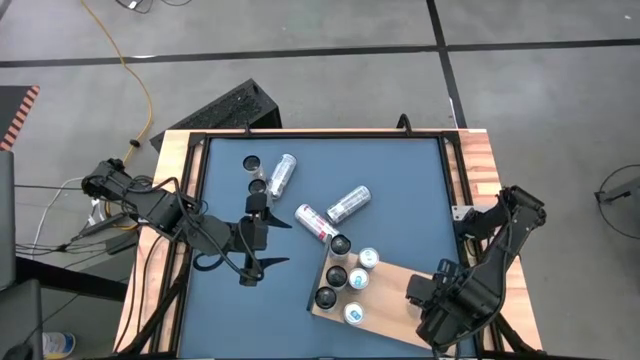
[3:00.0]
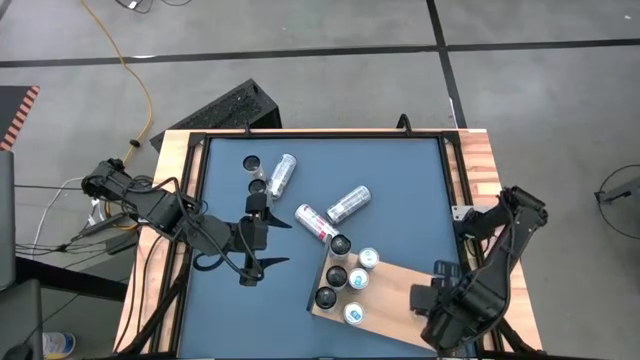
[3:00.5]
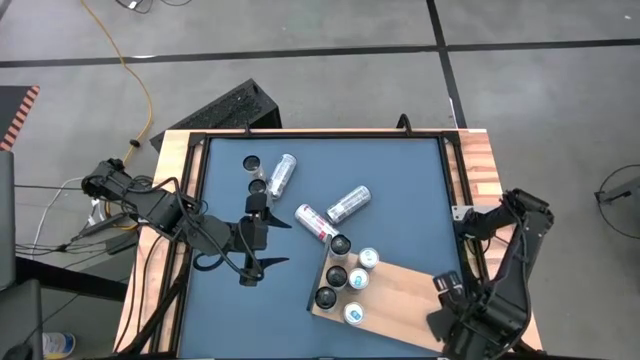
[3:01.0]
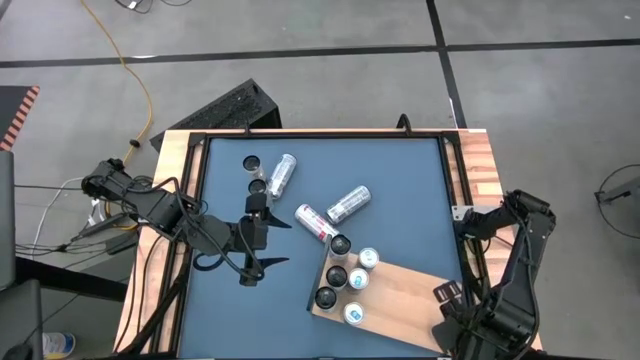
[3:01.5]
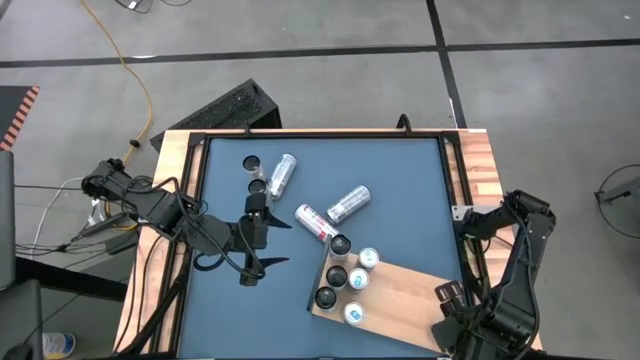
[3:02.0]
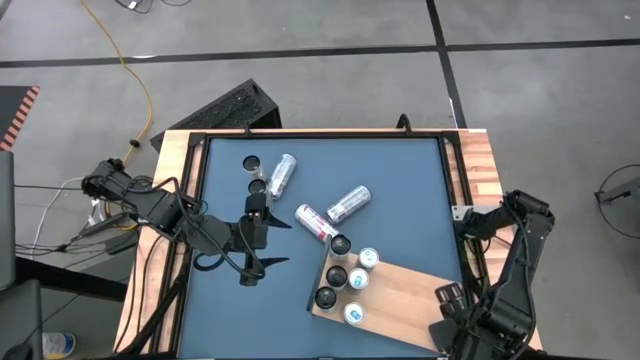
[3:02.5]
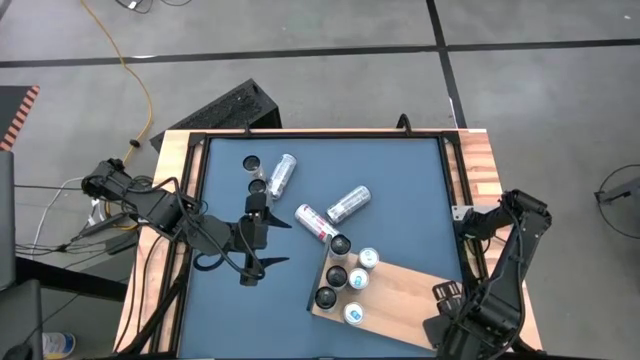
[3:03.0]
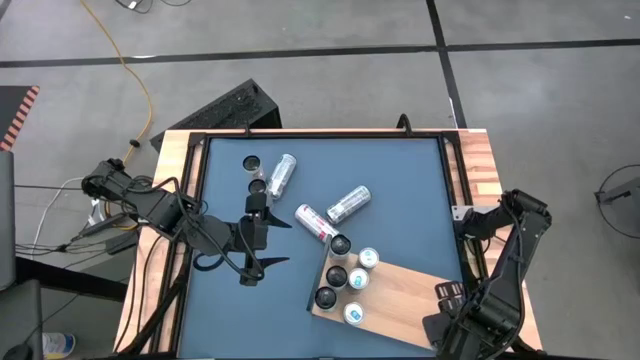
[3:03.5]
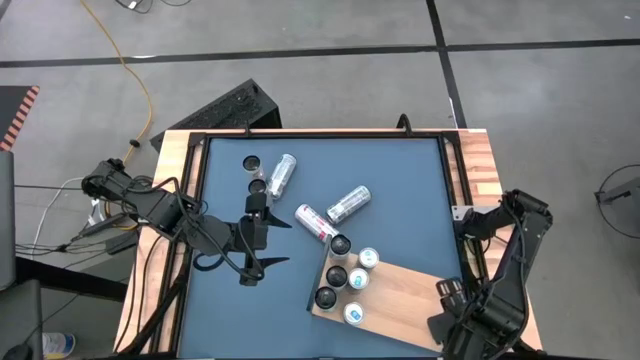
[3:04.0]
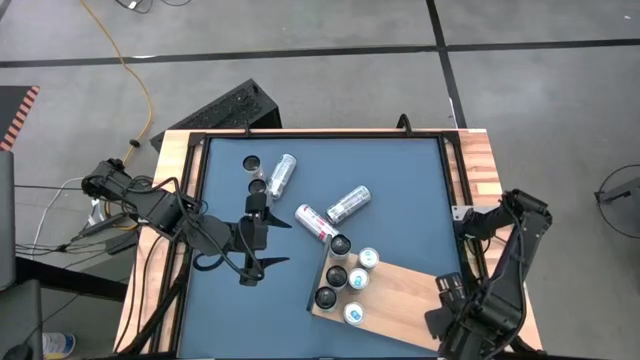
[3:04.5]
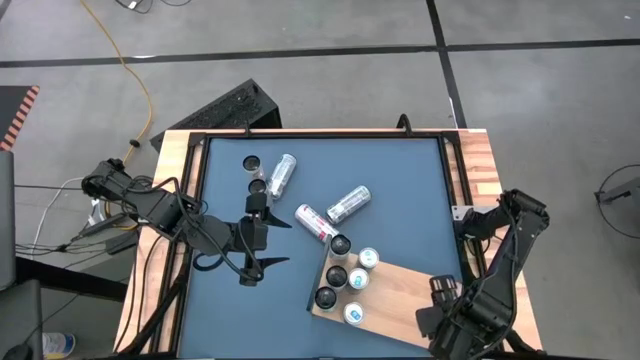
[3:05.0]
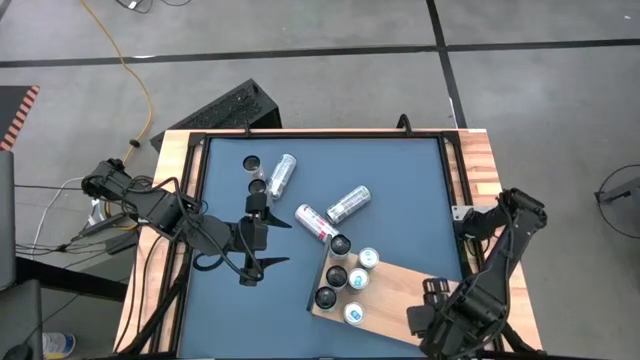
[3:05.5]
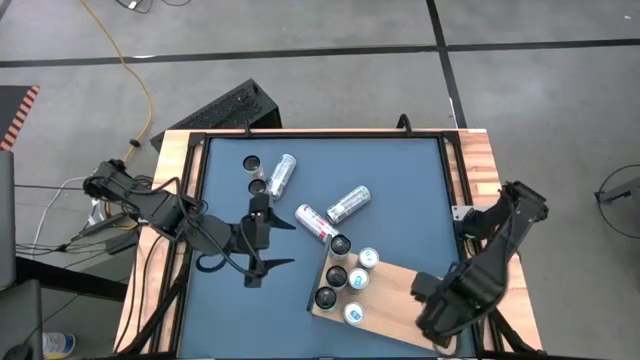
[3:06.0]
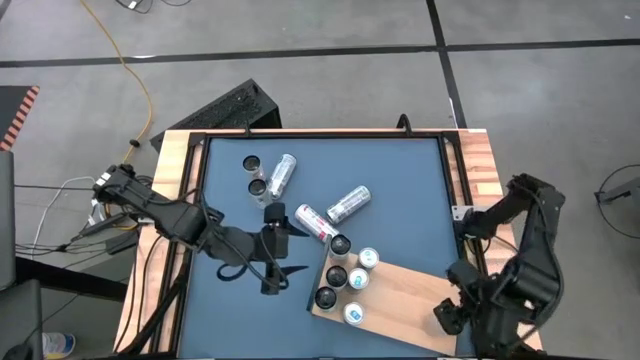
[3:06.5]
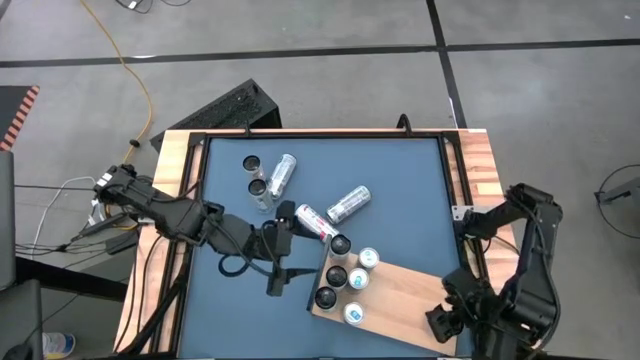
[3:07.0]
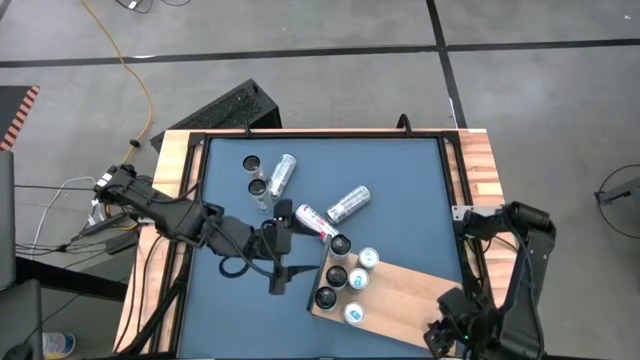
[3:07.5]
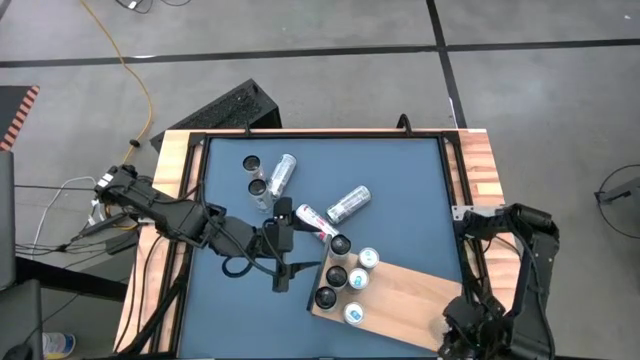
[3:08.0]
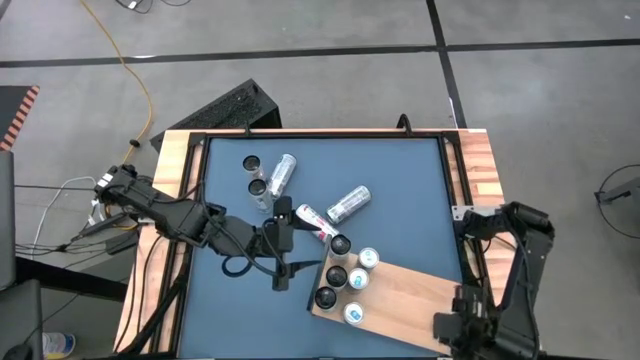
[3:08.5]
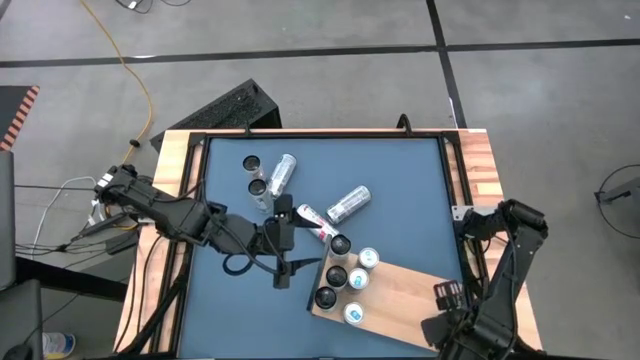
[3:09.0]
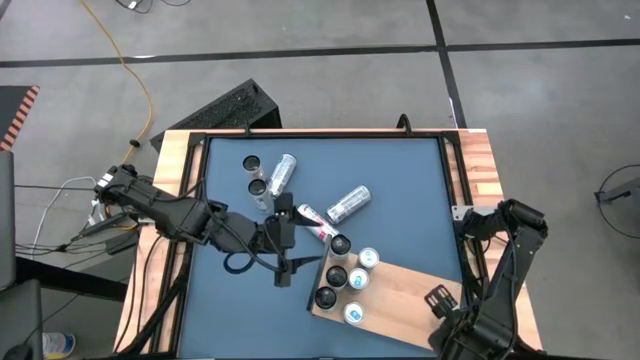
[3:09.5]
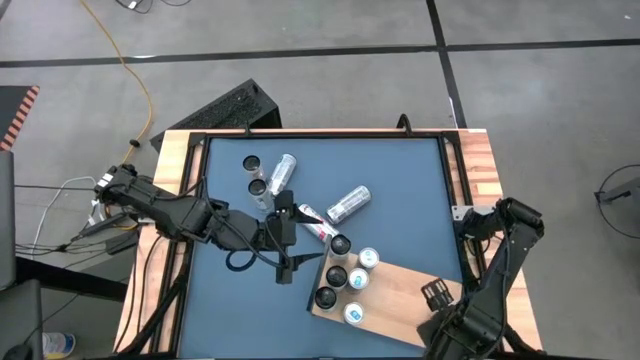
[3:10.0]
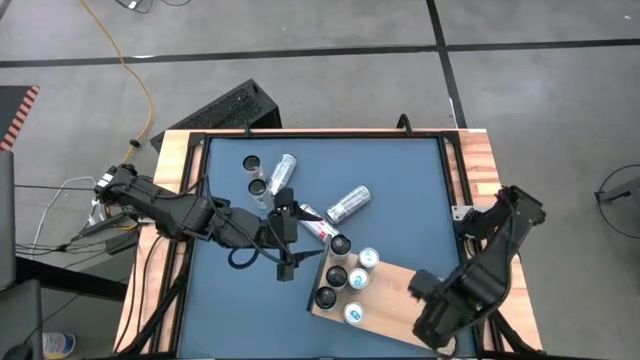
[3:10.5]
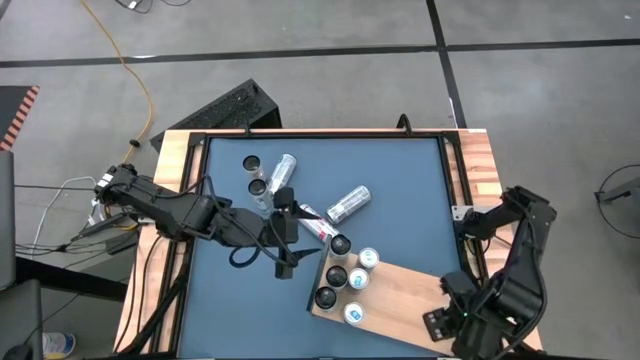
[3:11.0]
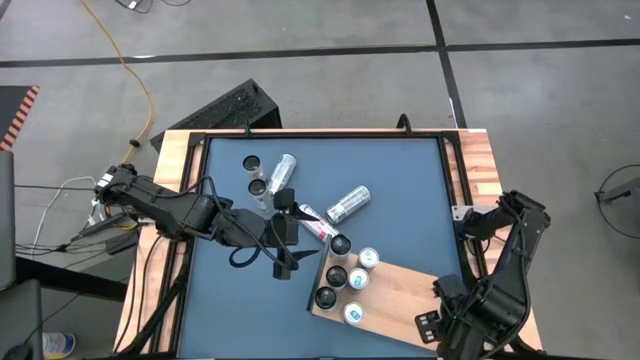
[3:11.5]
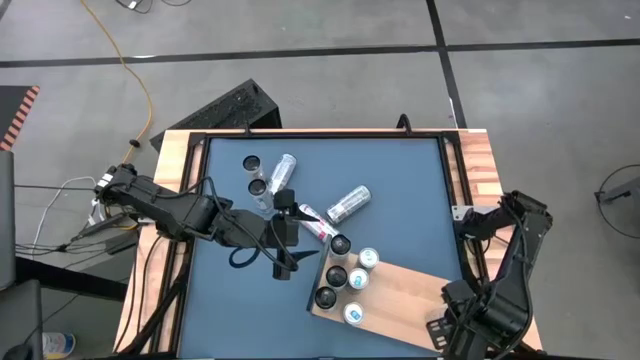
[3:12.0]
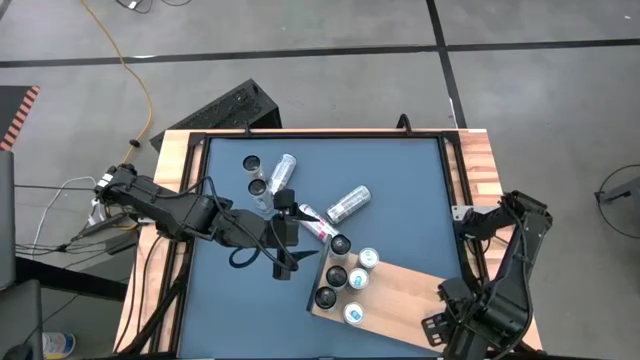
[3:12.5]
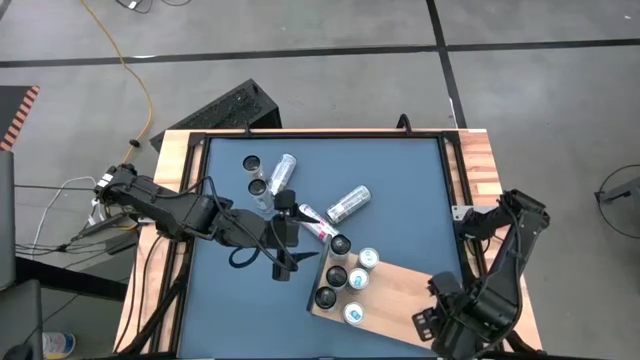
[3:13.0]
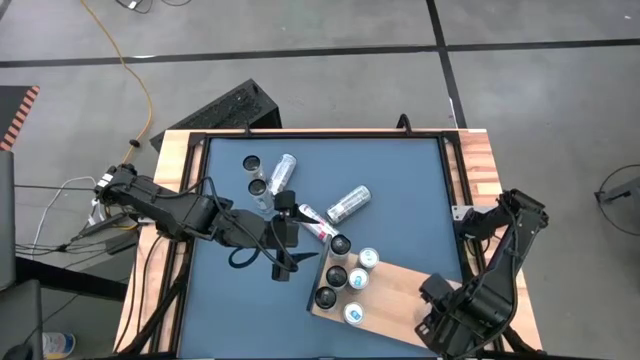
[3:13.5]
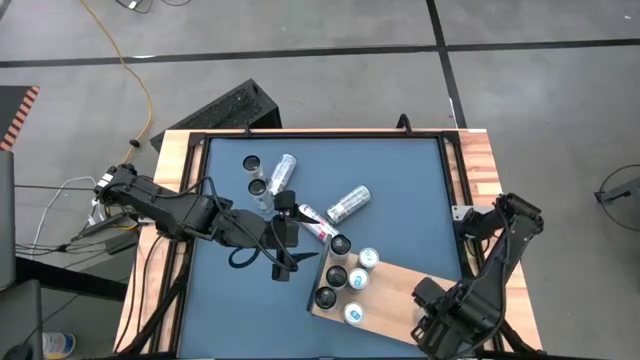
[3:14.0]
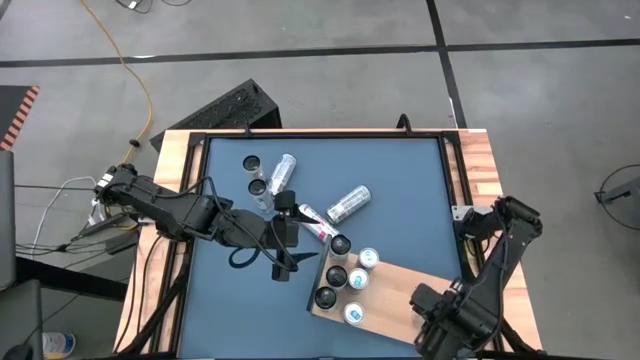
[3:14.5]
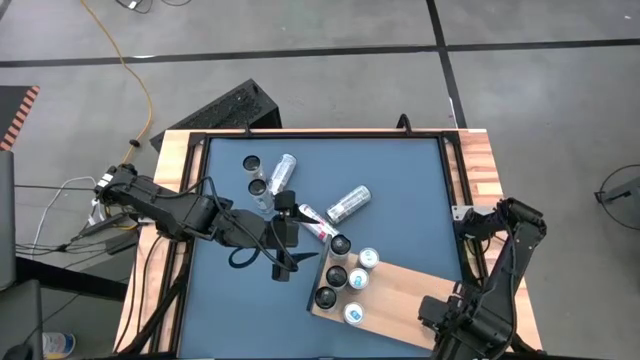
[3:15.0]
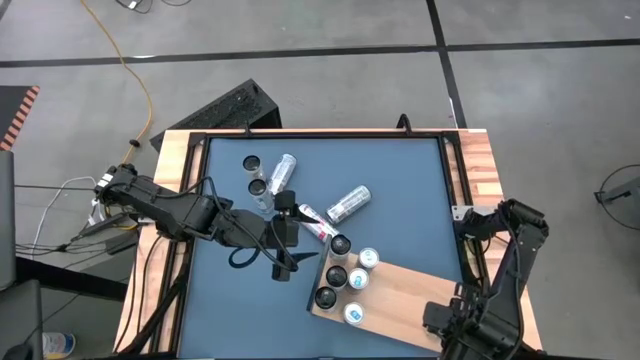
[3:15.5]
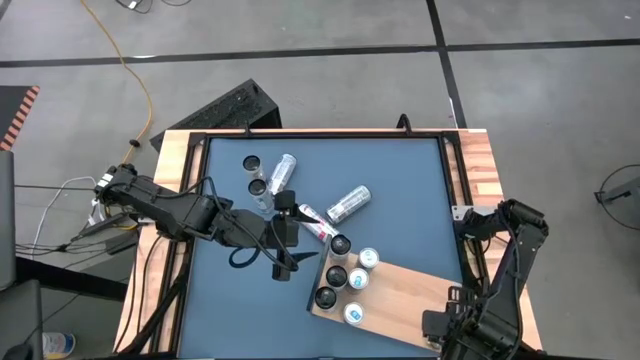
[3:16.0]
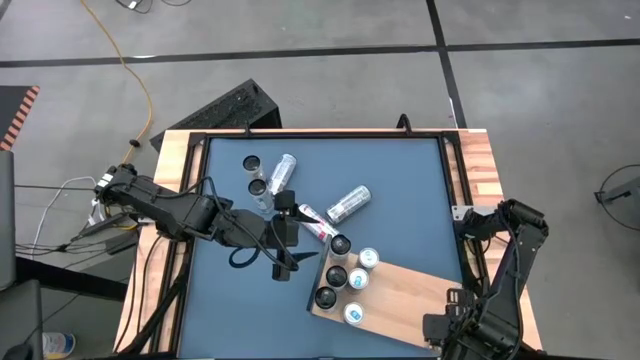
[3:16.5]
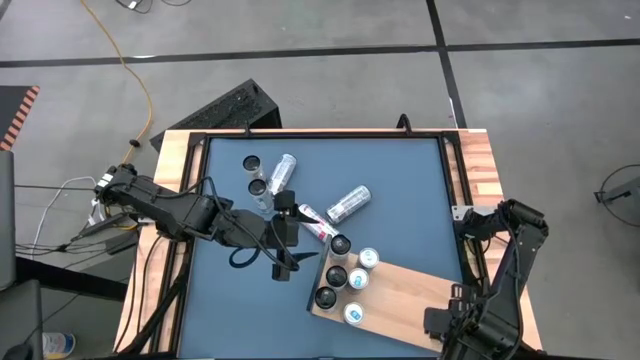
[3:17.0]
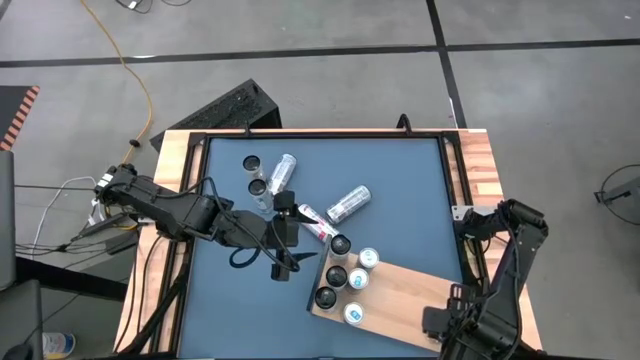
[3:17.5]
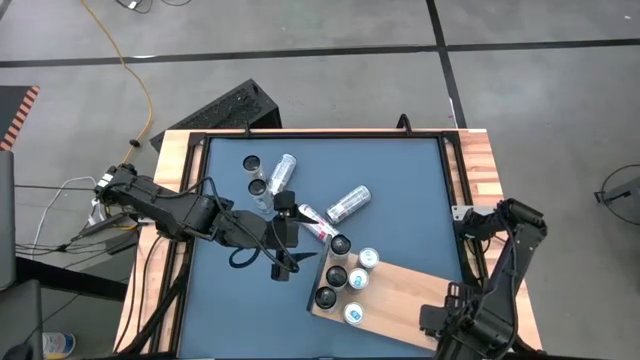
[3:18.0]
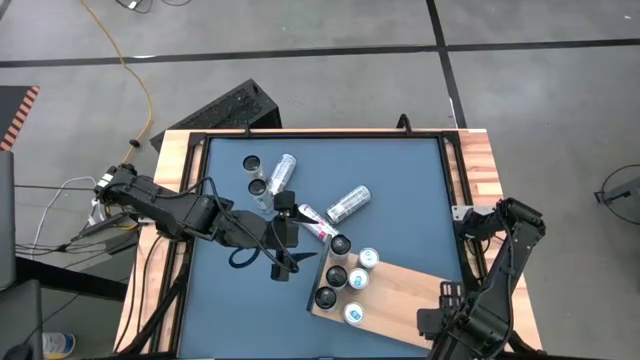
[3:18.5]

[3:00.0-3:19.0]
Task: Place canned beverage on shelf
Put the bottom white yellow soda can on the shelf

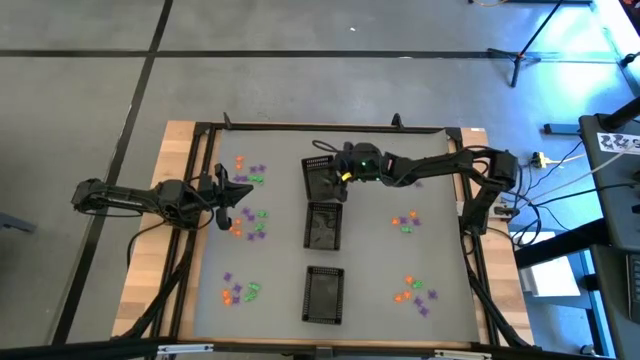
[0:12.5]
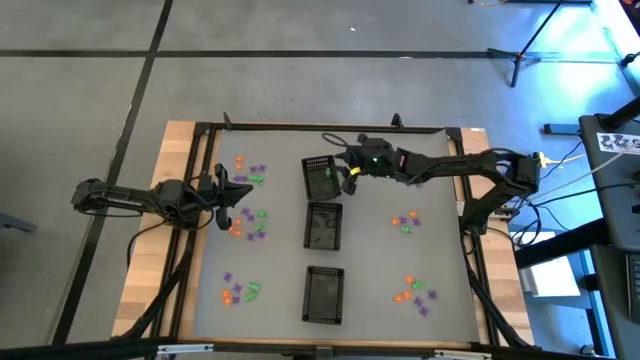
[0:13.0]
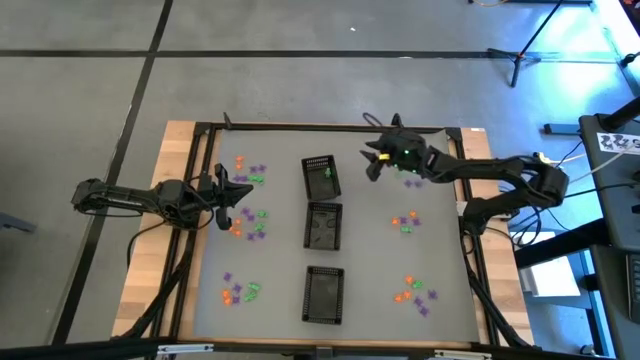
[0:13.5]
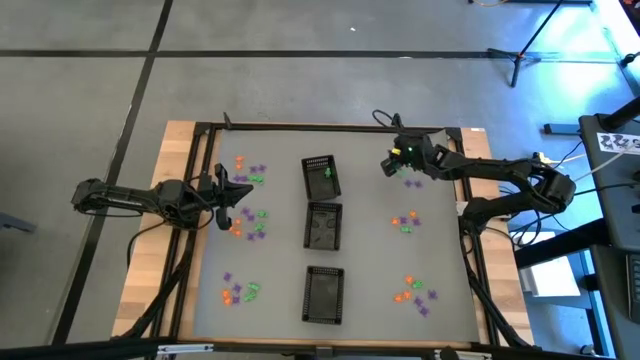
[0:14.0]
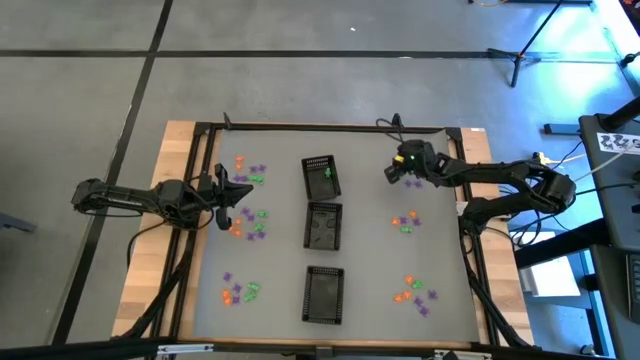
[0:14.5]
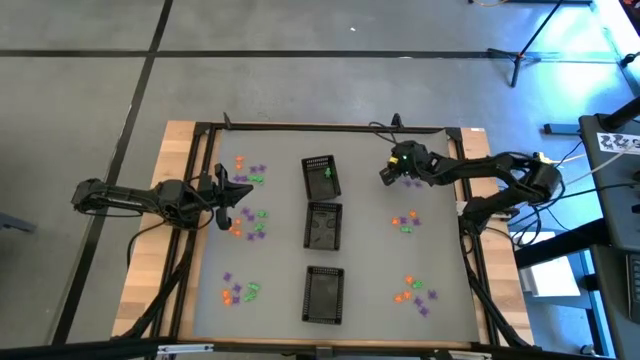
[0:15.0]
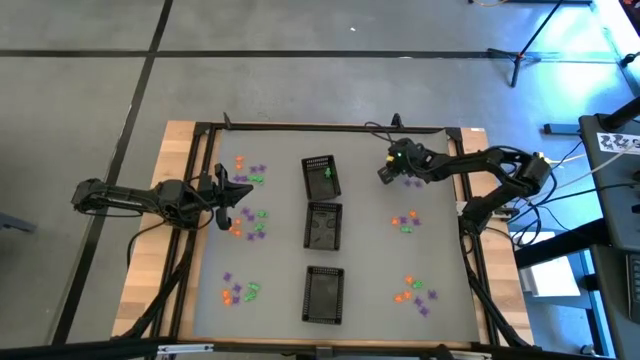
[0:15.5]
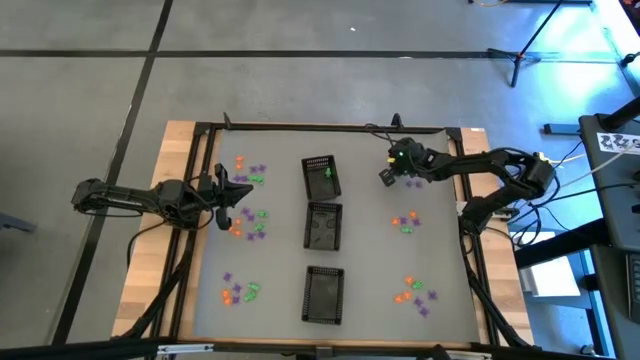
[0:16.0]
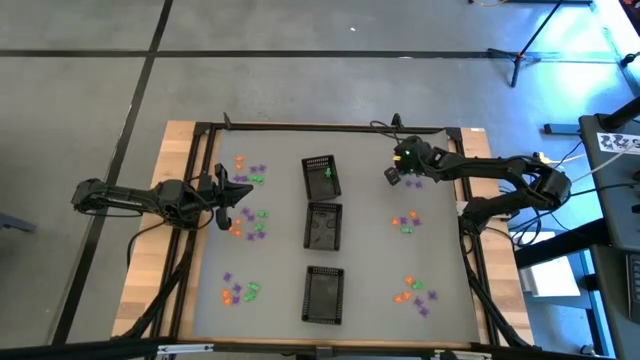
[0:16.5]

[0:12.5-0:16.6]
Task: Sort Halloween decoration
Put the orange spider toy into the middle black bin
